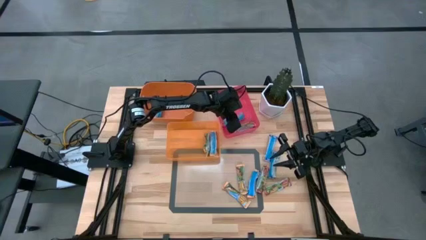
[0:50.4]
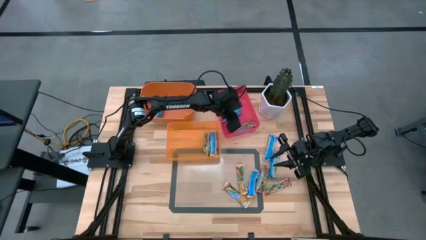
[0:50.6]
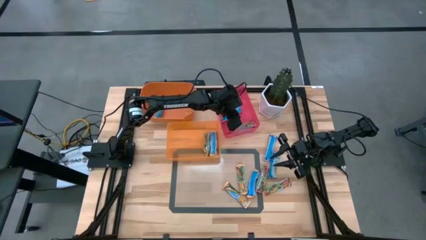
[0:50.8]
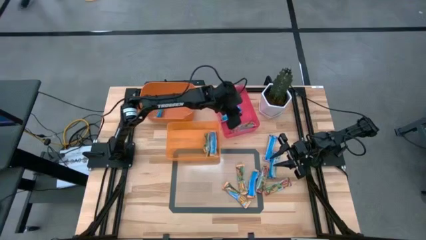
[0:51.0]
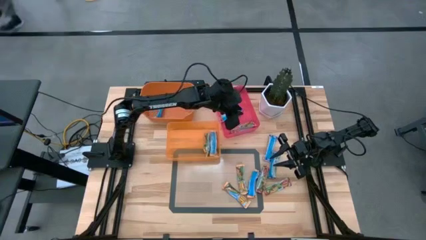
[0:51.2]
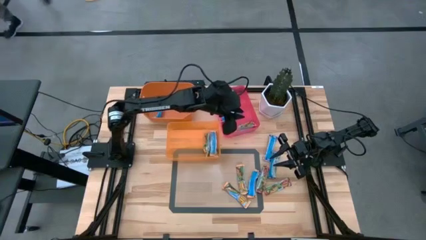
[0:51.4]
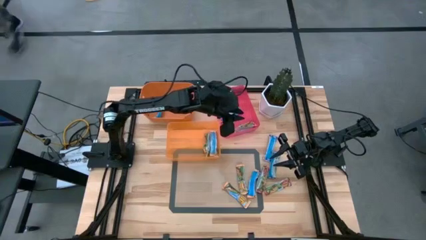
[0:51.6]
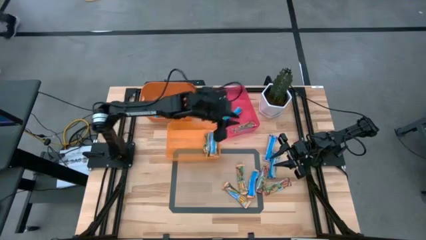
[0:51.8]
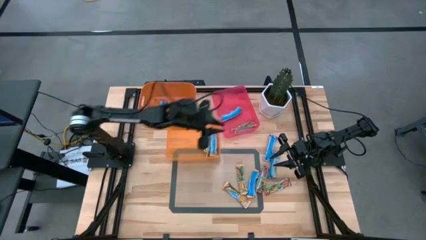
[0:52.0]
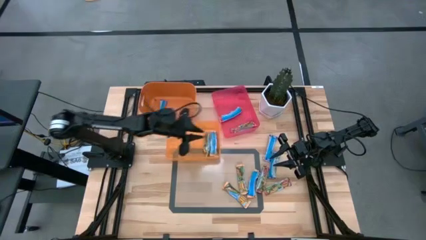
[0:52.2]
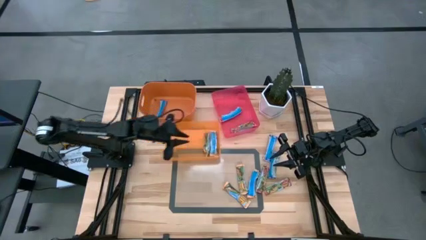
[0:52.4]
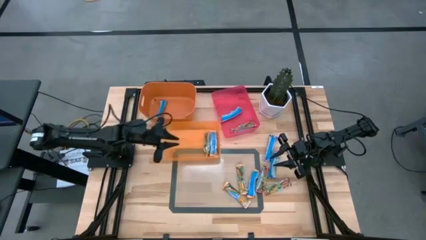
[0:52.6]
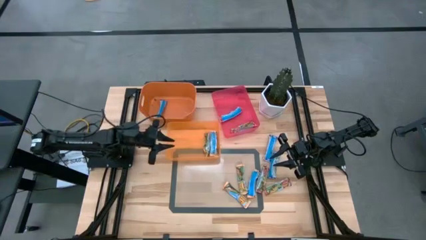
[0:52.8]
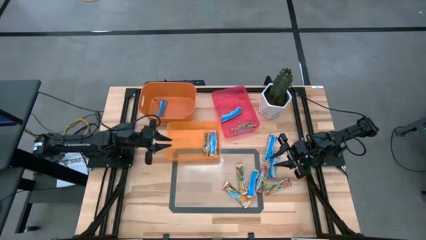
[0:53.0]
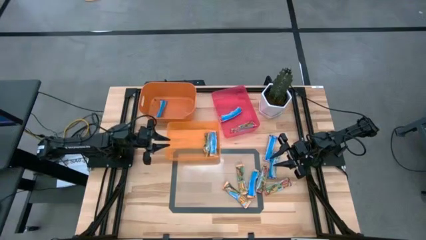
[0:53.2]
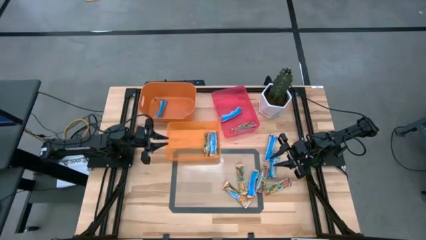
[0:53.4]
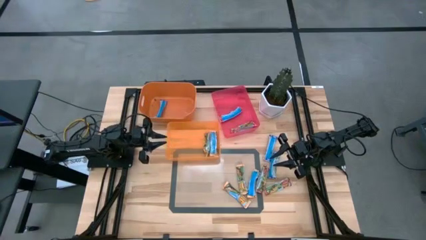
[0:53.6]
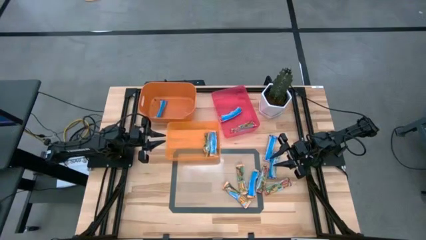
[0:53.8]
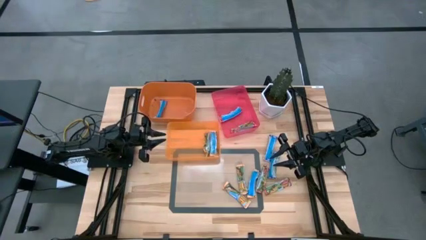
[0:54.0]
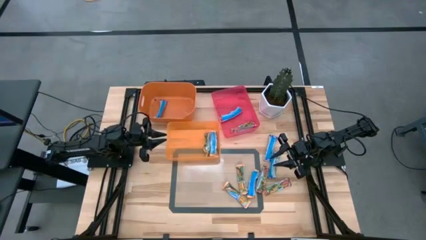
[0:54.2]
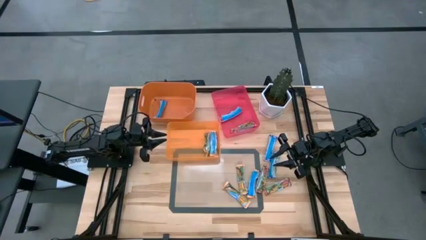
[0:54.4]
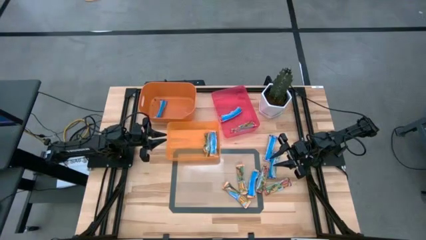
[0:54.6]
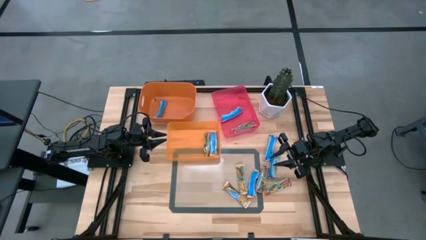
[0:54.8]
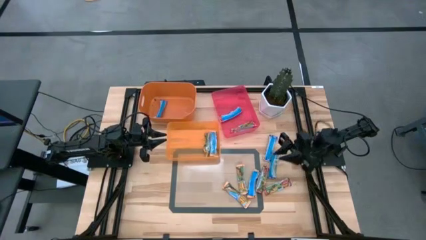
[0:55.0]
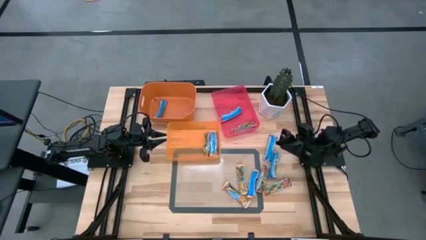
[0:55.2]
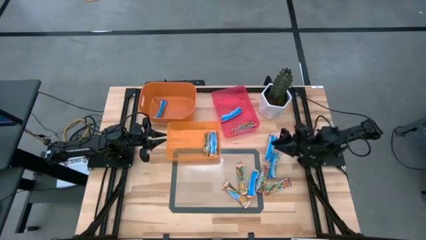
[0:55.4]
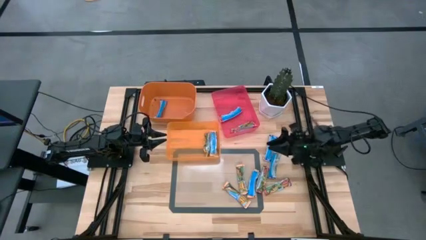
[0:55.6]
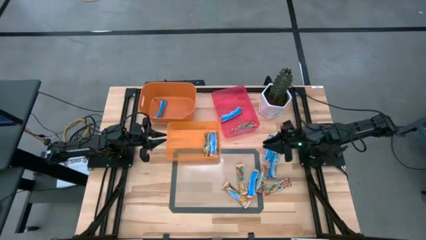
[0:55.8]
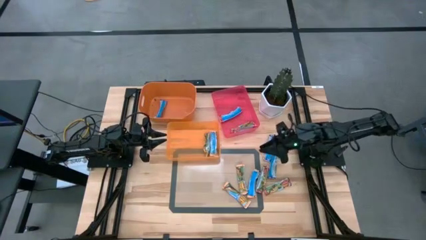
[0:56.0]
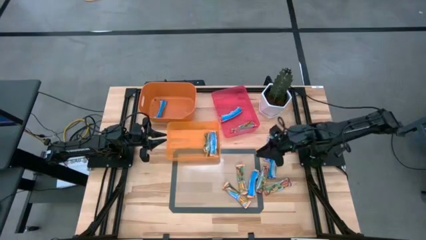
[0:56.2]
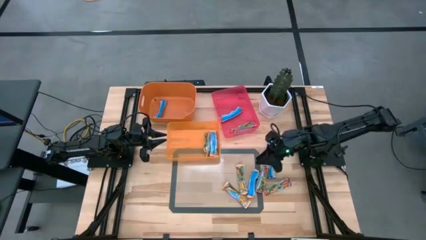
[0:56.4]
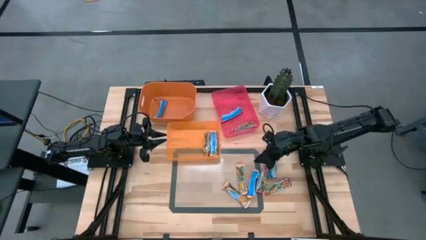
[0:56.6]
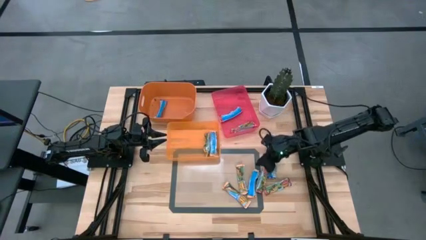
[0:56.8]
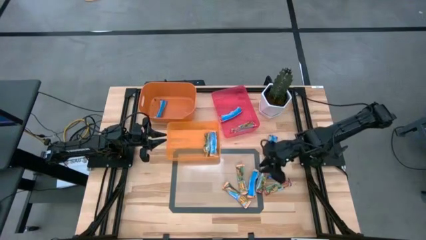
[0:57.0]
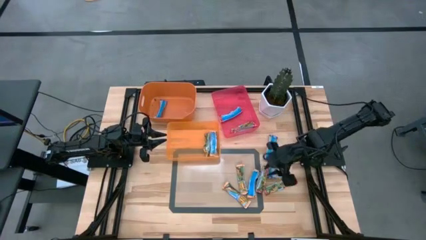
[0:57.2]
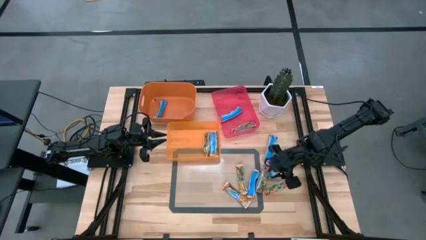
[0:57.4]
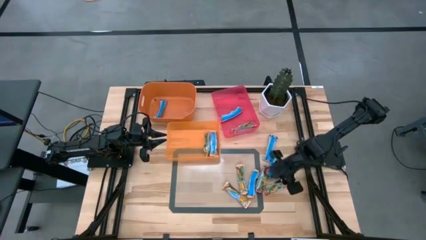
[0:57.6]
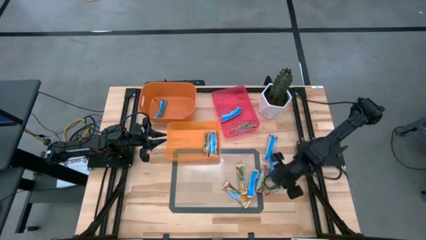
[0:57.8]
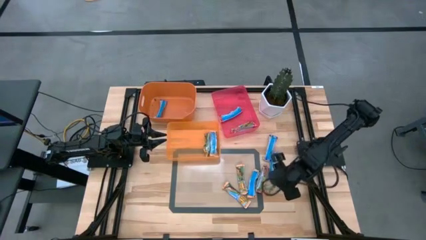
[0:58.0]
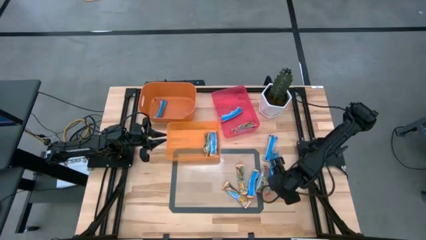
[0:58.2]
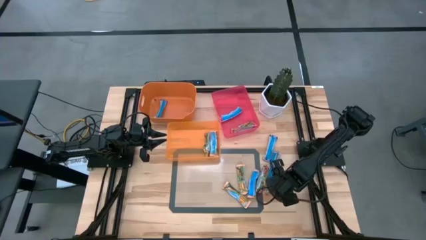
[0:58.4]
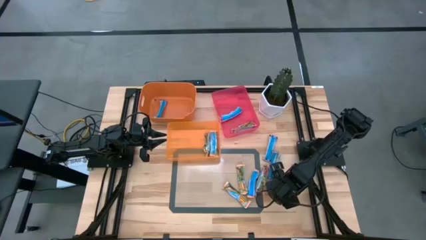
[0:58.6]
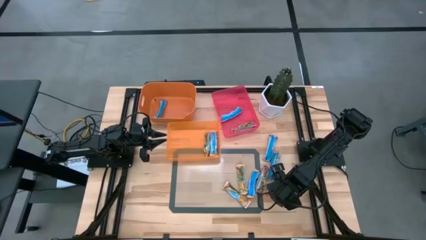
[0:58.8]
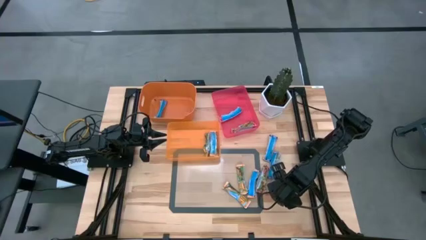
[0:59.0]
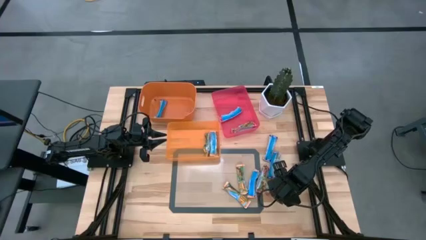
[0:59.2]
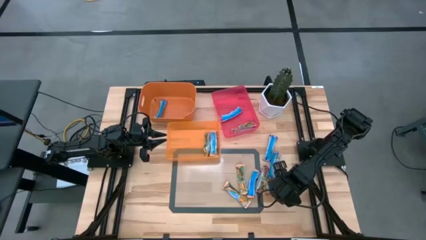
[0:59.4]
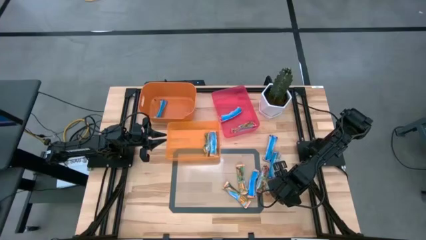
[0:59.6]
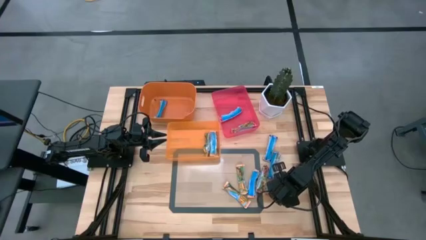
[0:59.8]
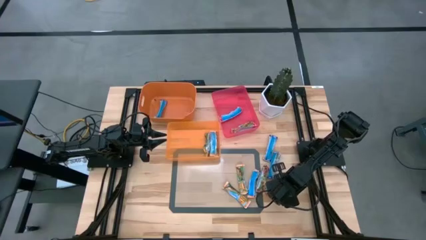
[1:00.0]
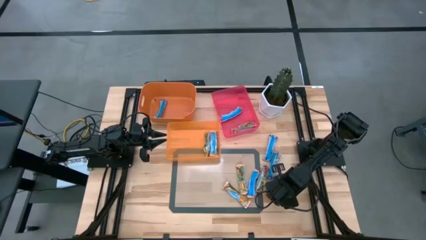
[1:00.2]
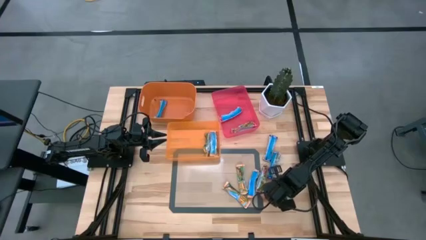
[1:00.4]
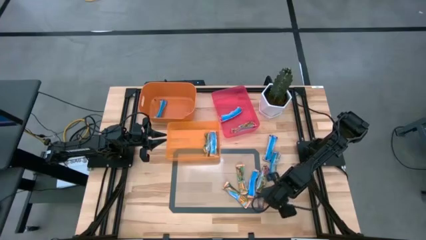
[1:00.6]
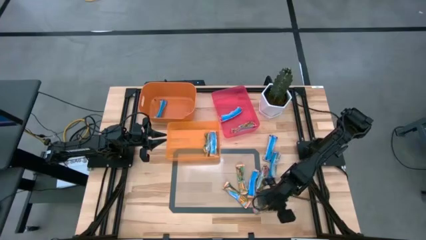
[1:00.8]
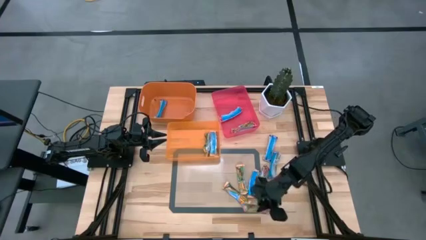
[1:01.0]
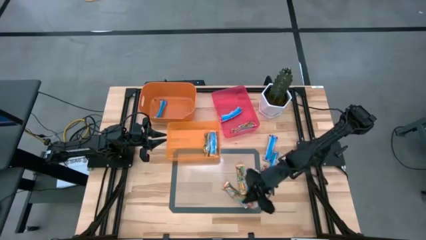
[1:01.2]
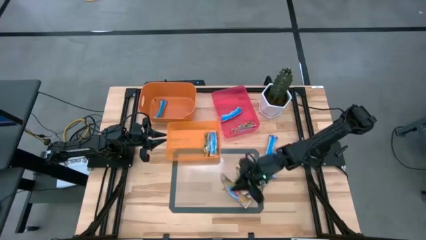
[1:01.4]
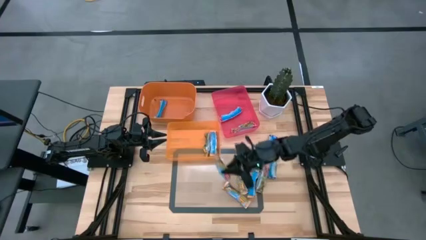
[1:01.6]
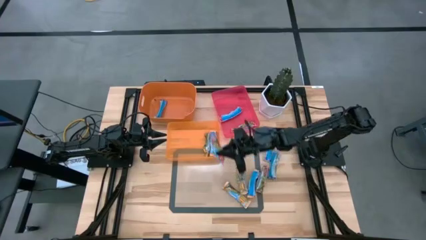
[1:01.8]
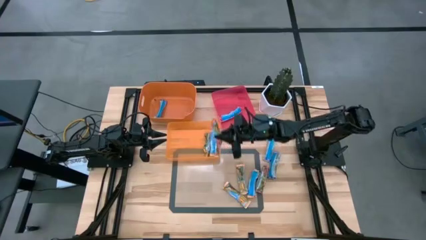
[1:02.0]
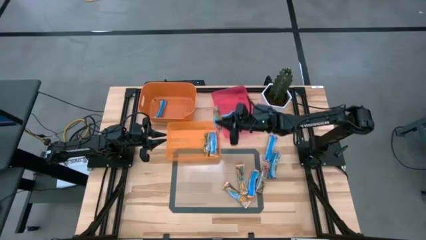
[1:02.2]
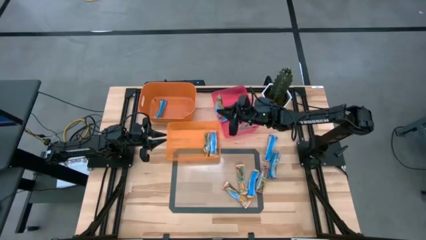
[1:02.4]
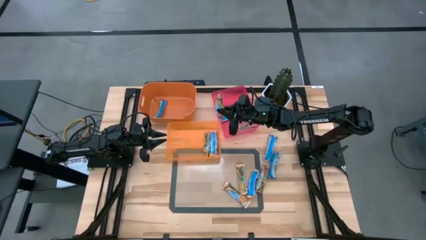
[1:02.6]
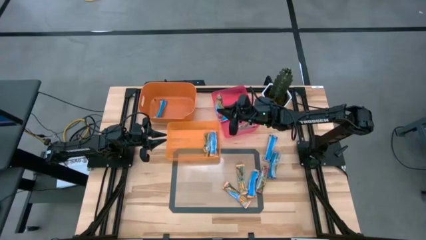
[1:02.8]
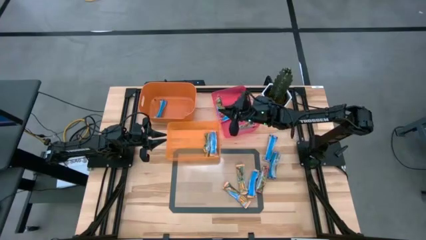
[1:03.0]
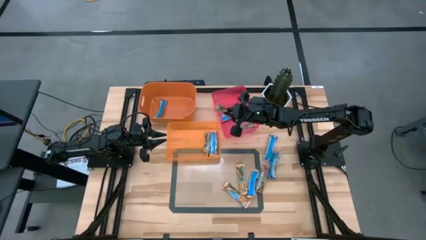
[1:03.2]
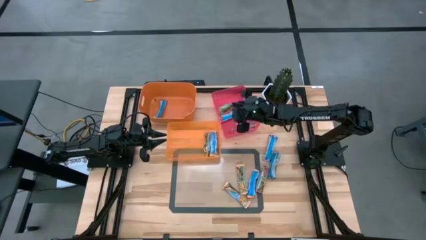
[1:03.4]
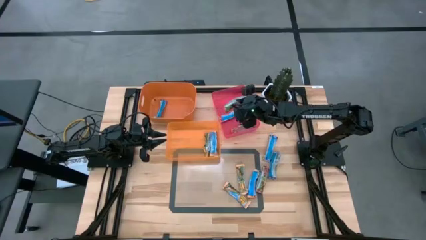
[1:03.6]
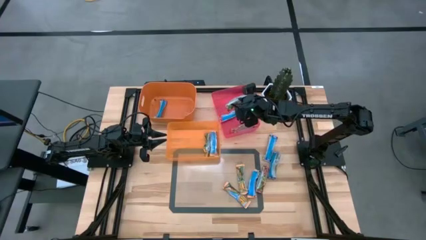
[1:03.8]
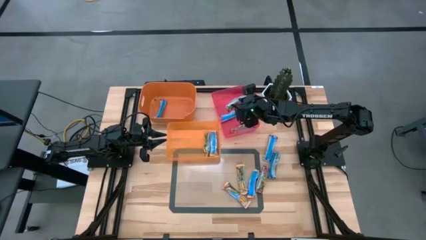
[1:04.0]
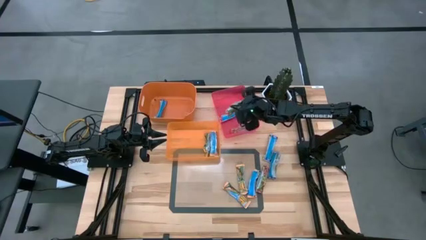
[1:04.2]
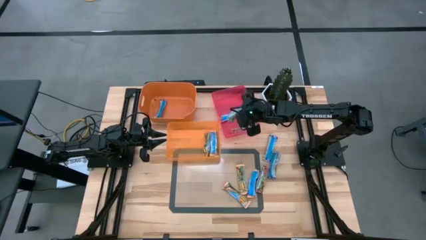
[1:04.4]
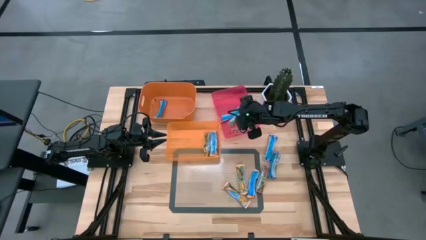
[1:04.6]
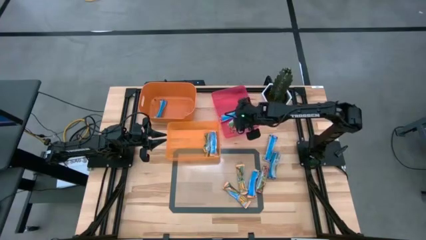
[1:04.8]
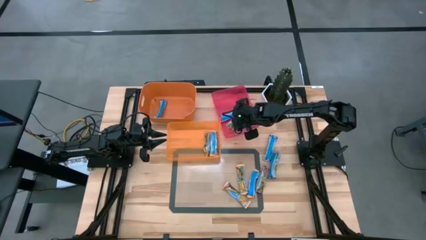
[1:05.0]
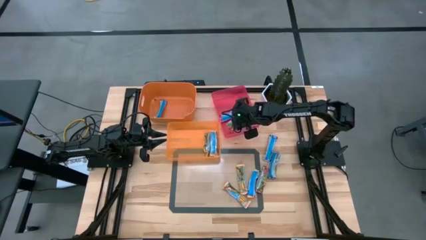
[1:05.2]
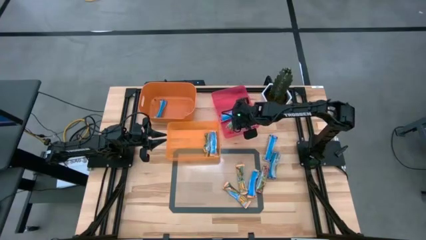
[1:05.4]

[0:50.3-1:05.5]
Task: Pick and place Granola Bars by type
Put the red granola bar into the red bin
